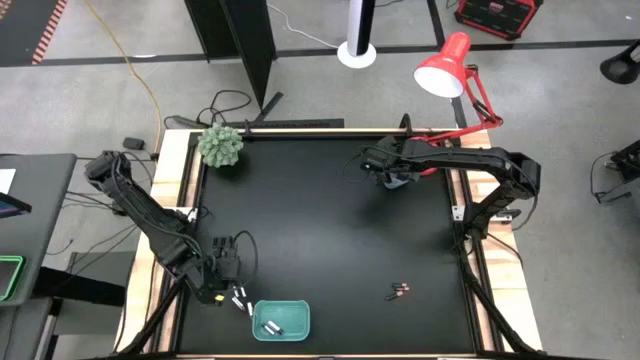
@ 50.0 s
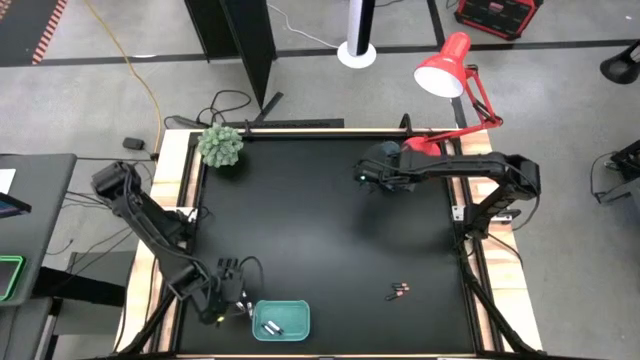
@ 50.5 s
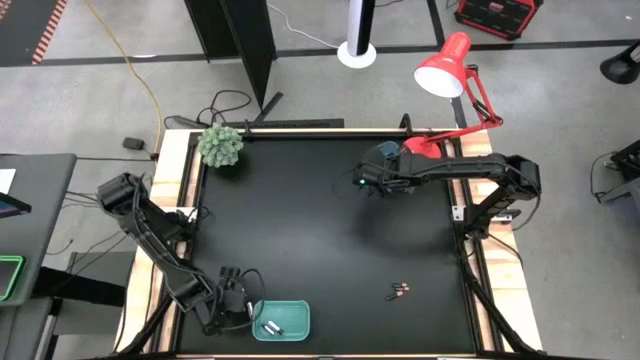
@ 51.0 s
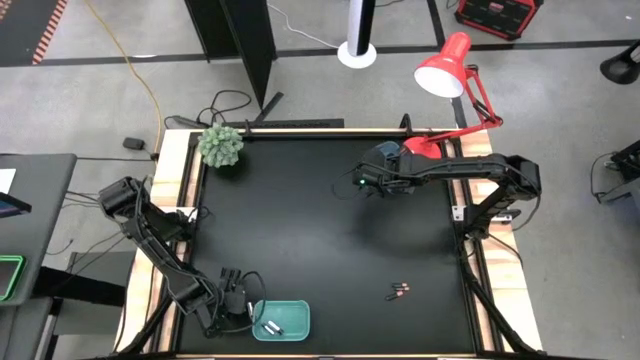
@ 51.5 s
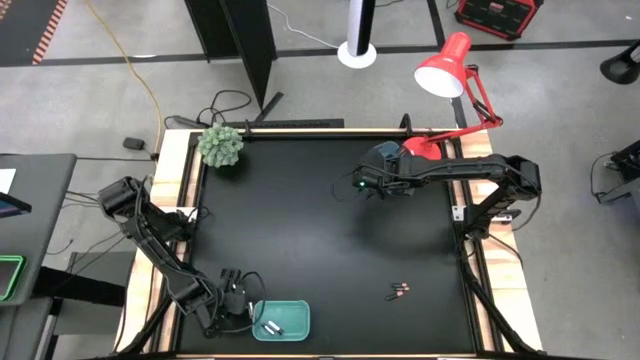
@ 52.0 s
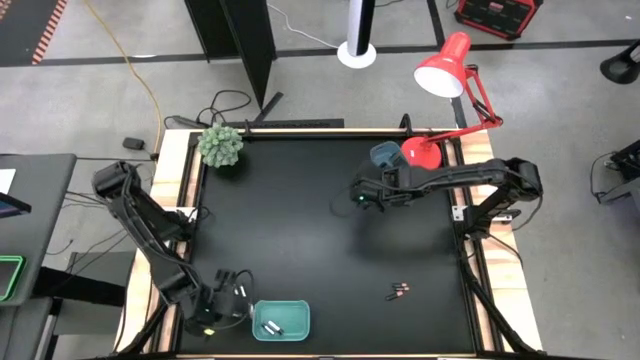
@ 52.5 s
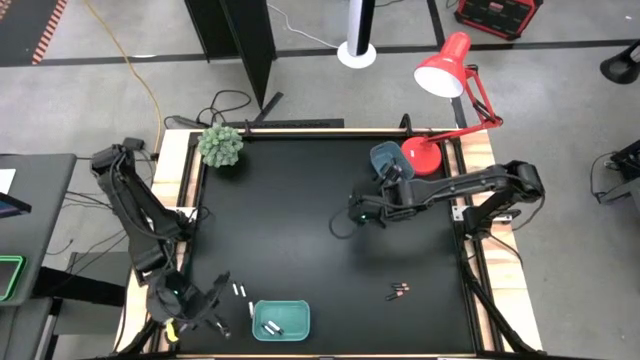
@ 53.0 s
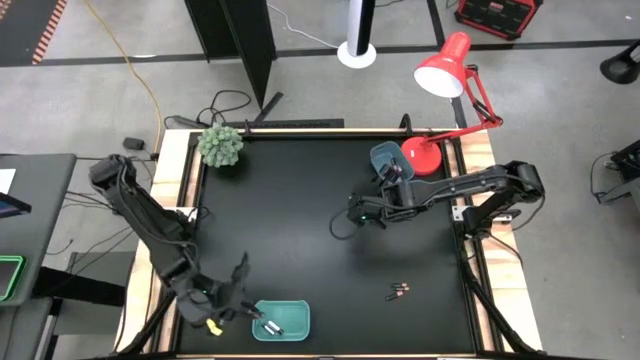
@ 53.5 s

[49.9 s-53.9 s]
Task: Sort batteries
Put the silver battery into the green bin

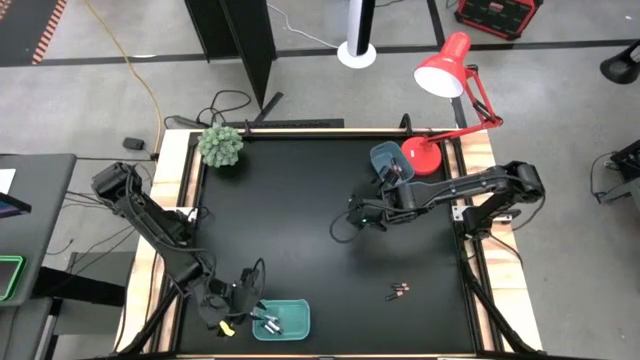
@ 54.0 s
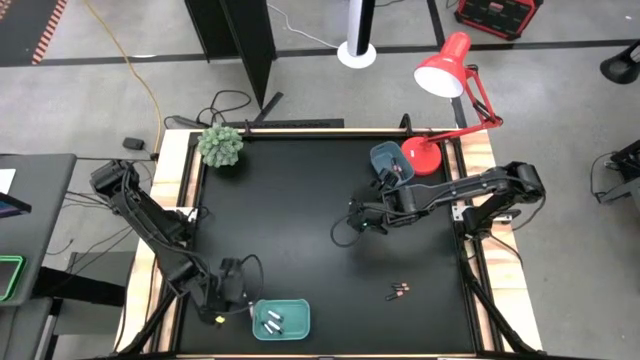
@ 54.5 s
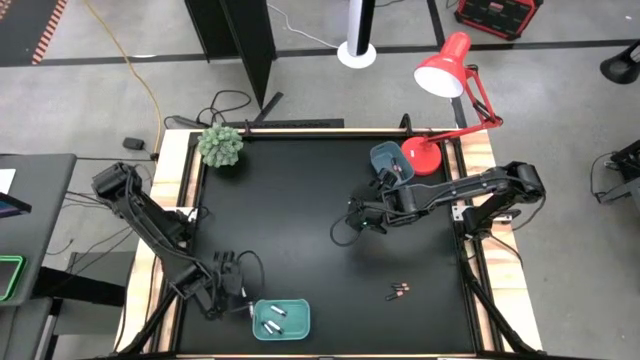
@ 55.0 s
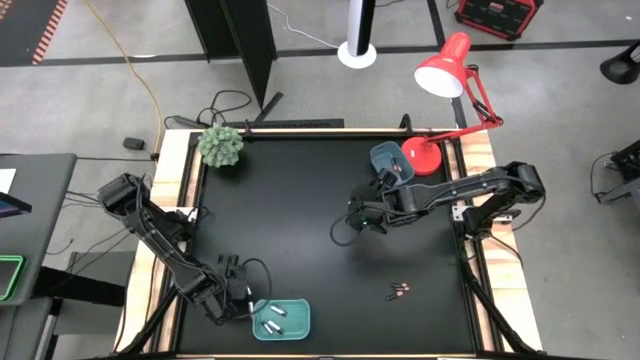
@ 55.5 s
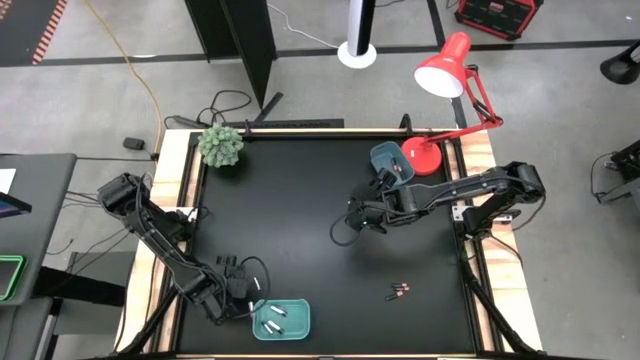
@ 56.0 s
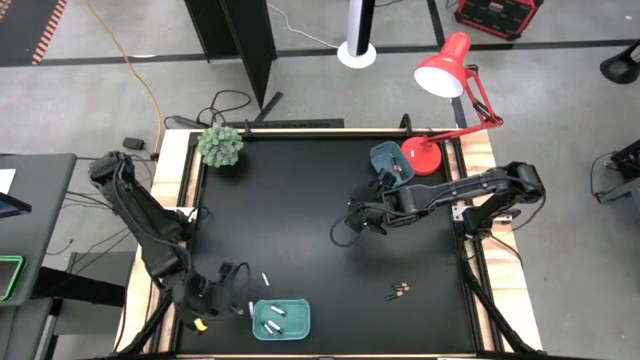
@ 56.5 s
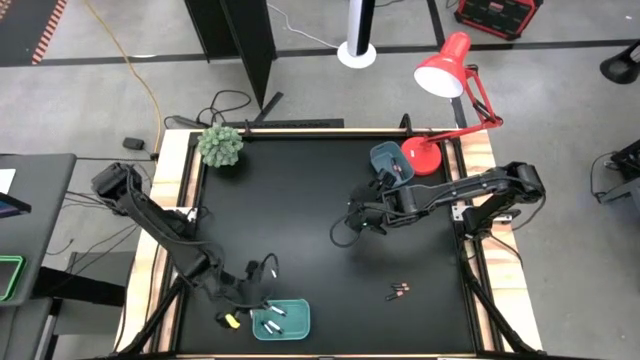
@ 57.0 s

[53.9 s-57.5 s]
Put the silver battery into the green bin

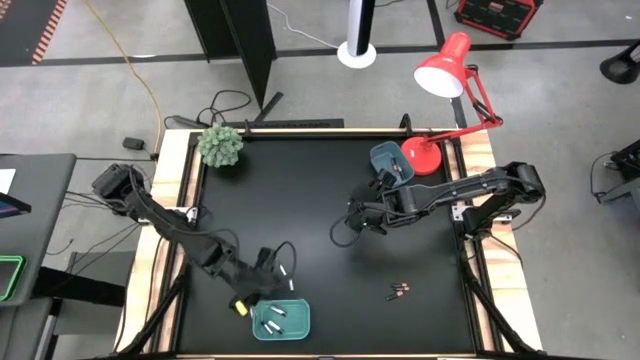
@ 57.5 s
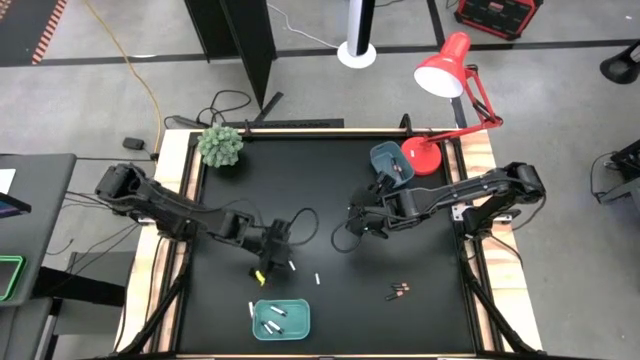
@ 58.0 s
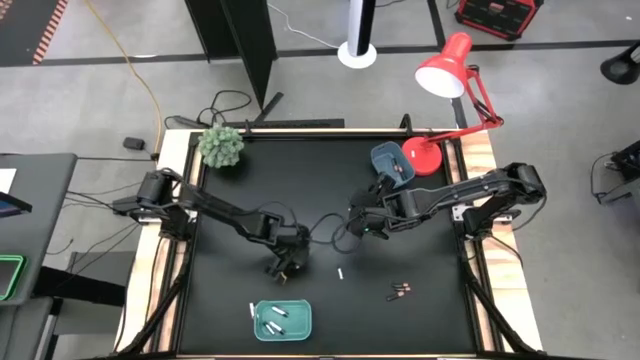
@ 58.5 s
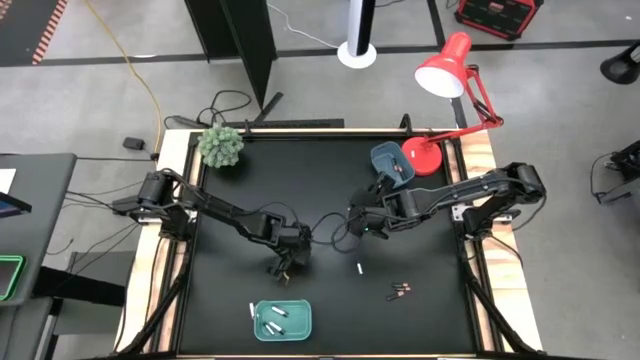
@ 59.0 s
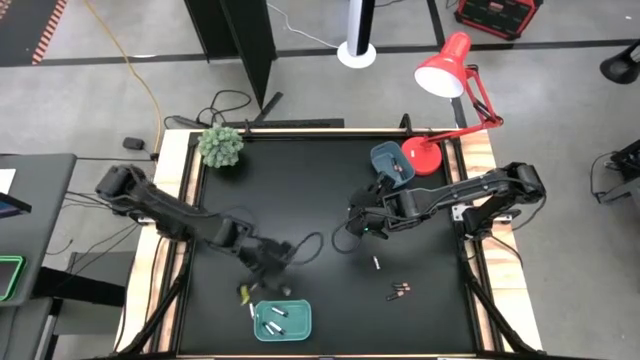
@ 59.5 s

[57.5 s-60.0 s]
Put the silver battery into the green bin

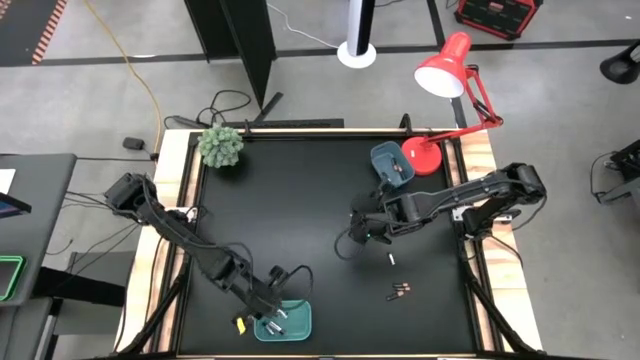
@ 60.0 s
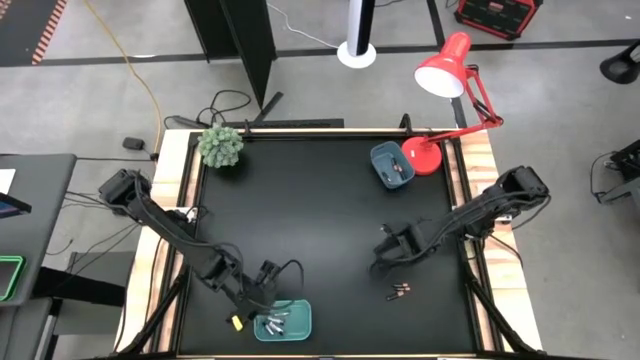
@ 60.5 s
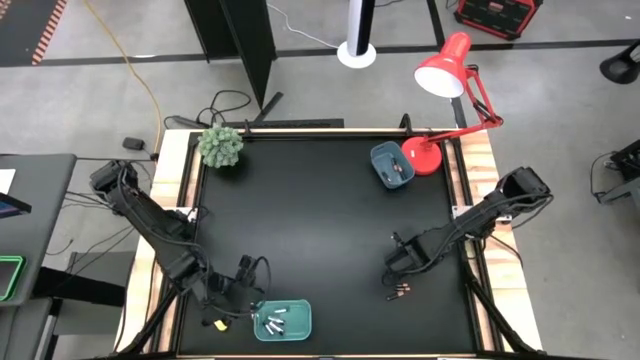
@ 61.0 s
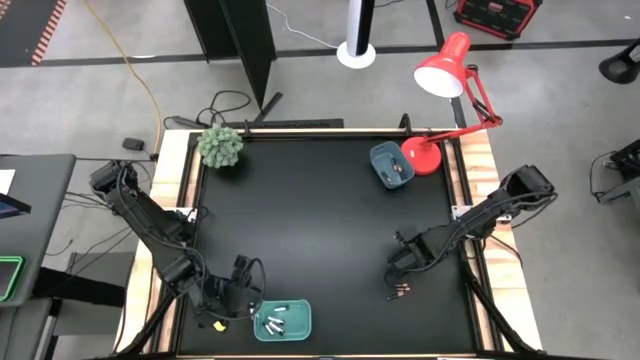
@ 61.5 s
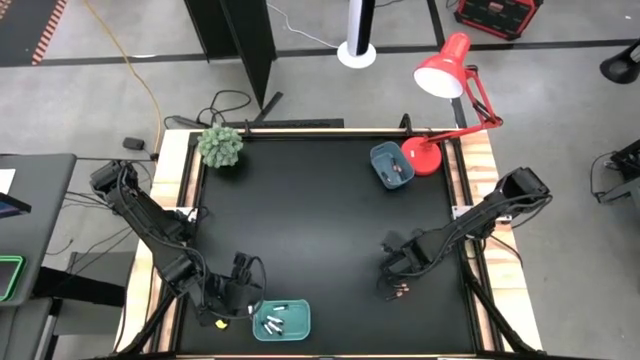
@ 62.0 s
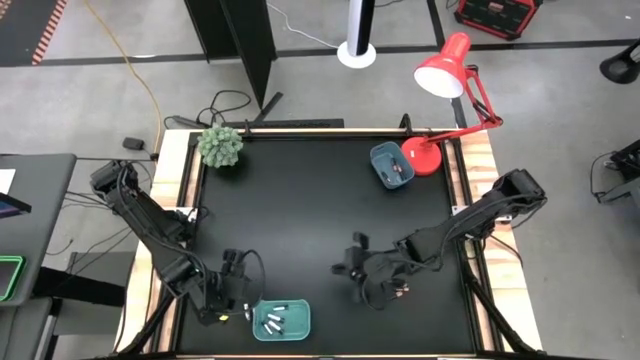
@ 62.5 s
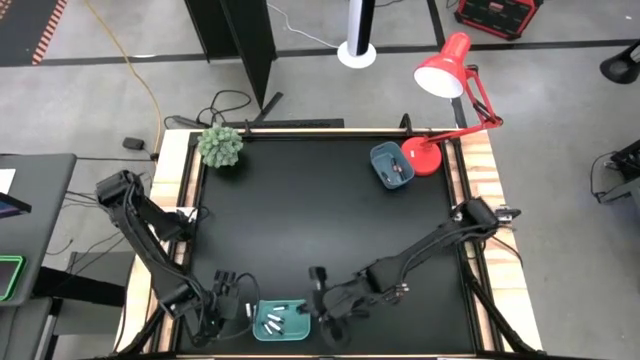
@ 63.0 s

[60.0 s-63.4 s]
Put the silver battery into the green bin

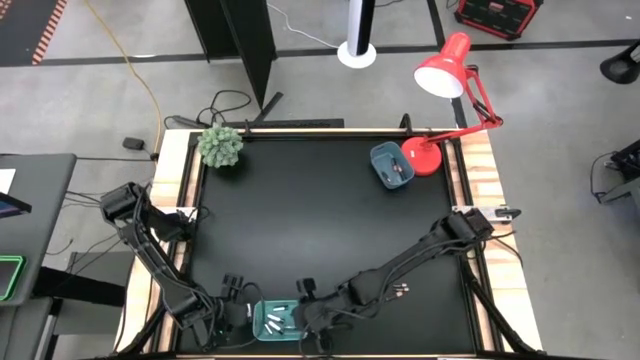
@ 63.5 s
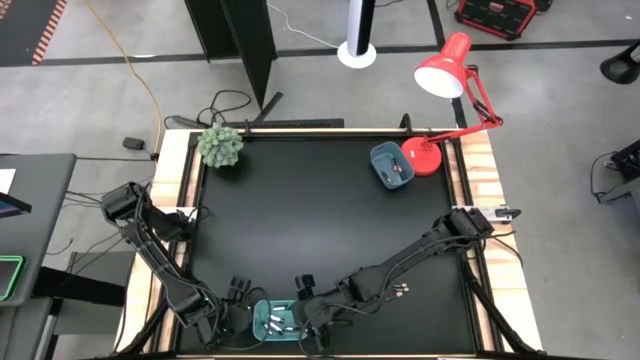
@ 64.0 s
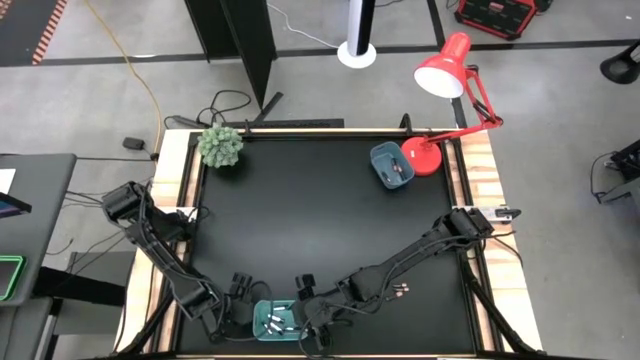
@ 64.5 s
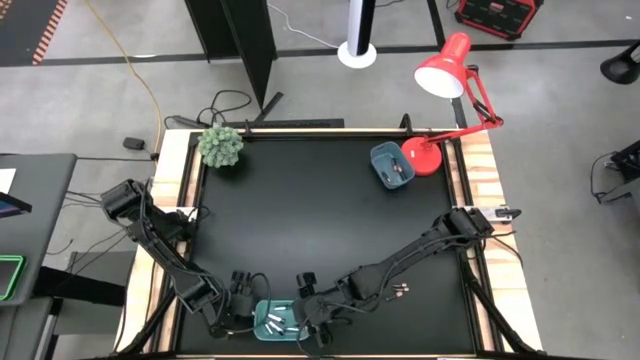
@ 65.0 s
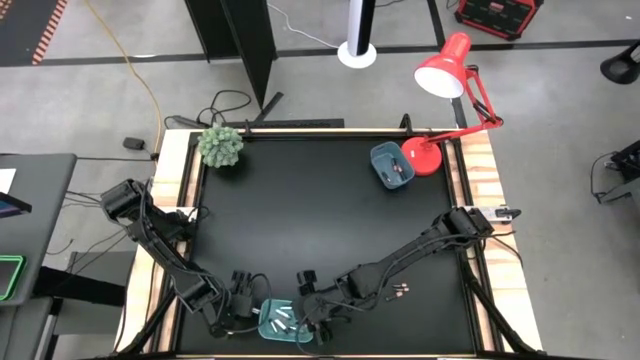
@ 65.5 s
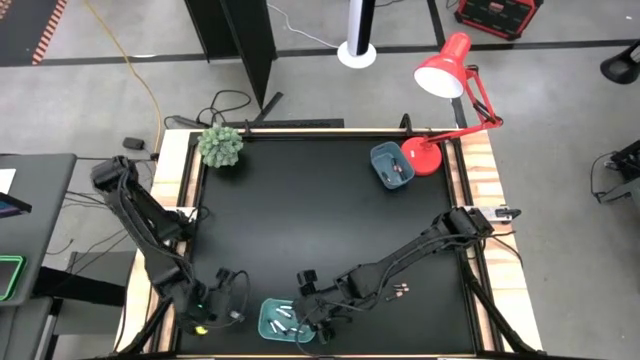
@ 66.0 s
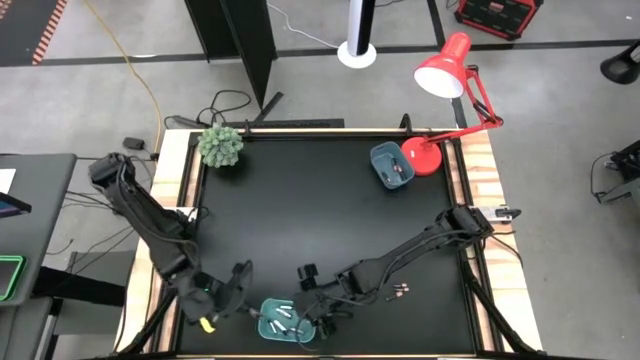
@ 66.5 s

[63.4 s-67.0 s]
Put the silver battery into the green bin

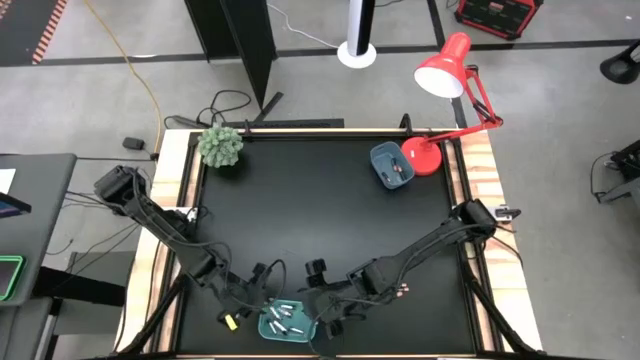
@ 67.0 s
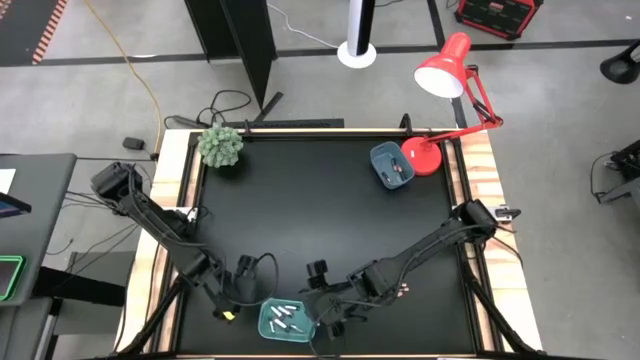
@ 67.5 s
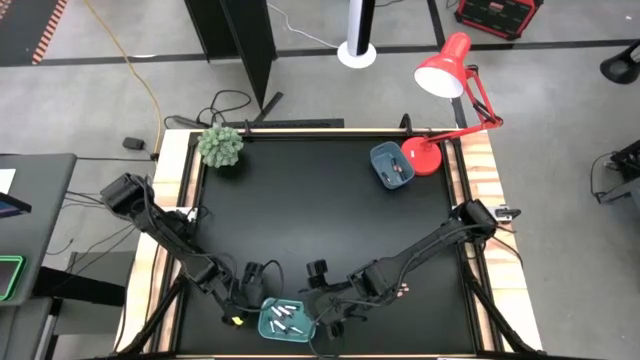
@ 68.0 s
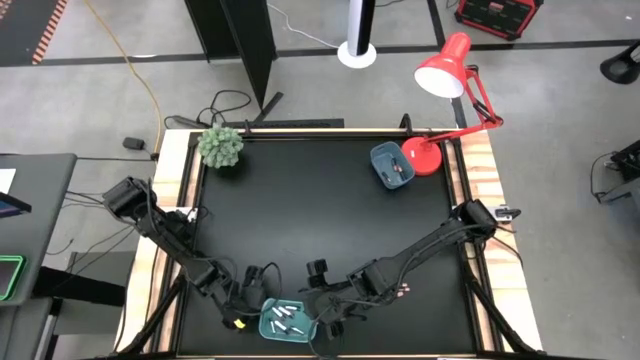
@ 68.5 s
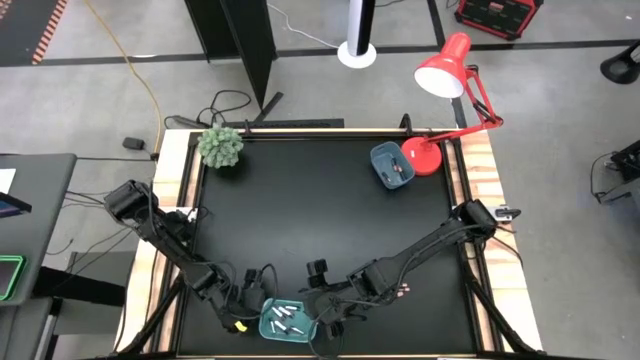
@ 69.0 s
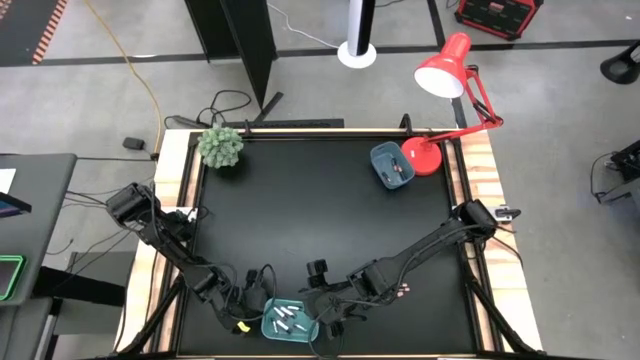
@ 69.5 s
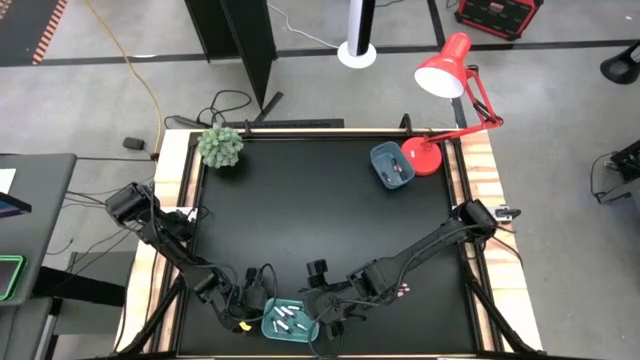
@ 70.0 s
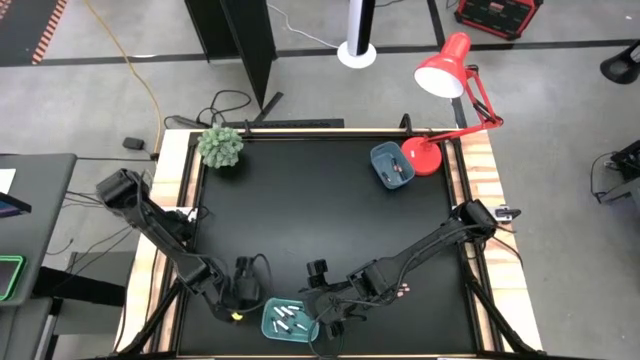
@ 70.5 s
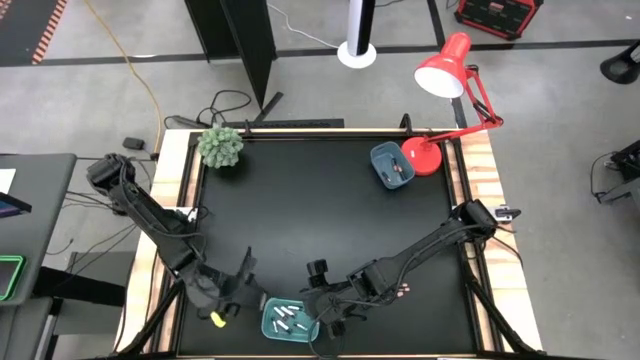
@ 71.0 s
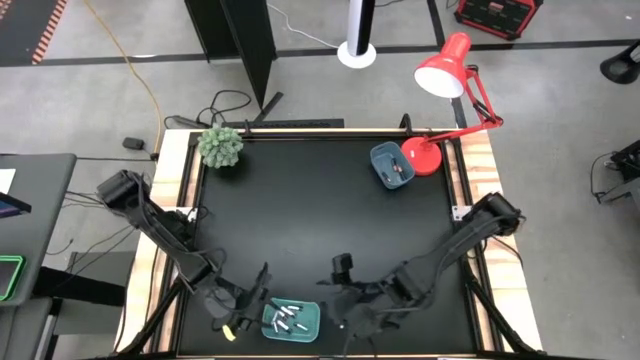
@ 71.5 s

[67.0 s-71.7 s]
Put the silver battery into the green bin
